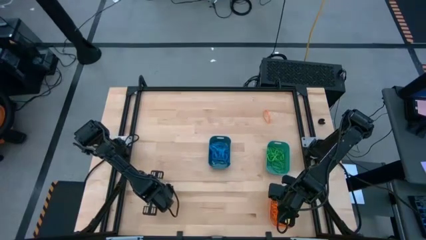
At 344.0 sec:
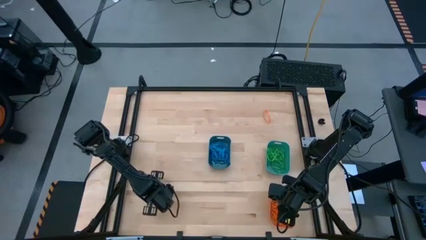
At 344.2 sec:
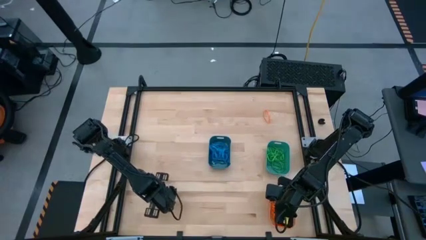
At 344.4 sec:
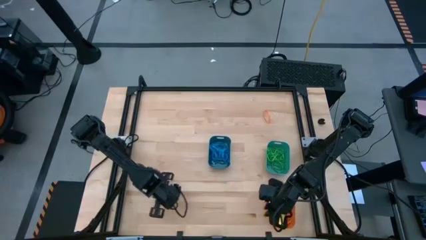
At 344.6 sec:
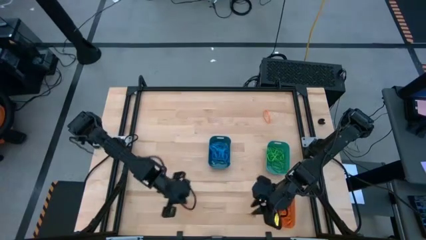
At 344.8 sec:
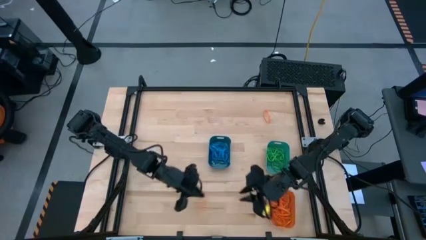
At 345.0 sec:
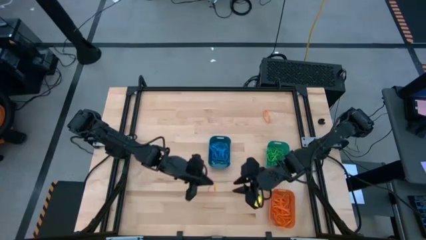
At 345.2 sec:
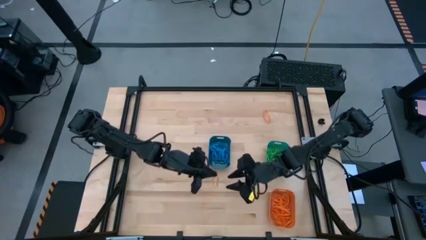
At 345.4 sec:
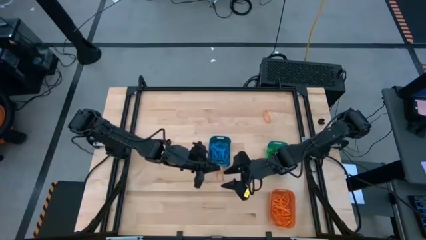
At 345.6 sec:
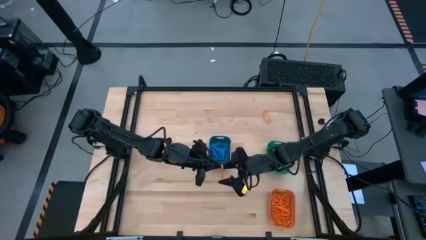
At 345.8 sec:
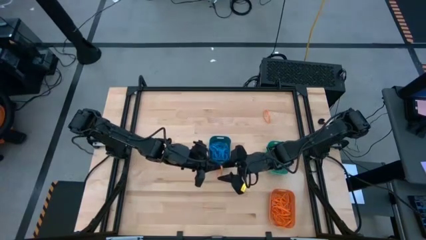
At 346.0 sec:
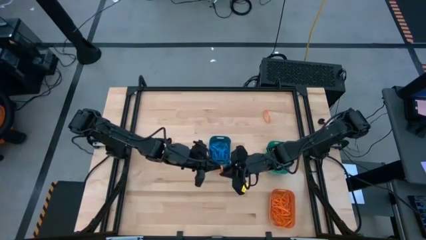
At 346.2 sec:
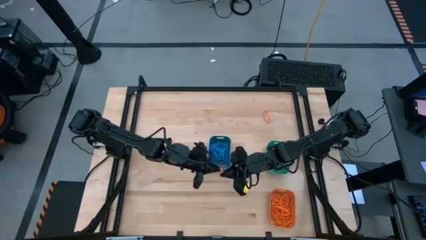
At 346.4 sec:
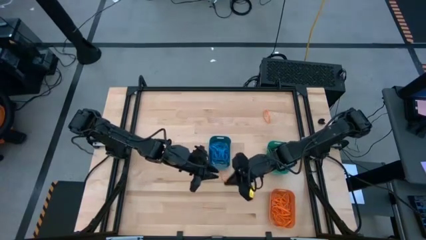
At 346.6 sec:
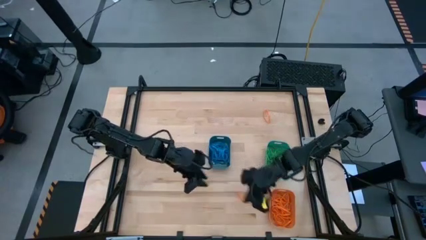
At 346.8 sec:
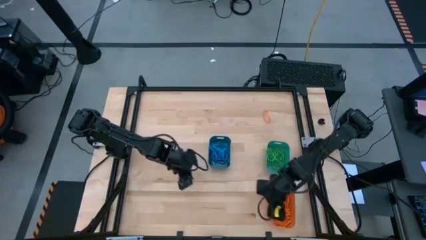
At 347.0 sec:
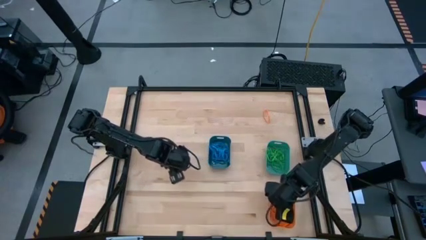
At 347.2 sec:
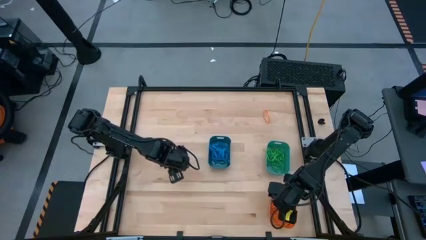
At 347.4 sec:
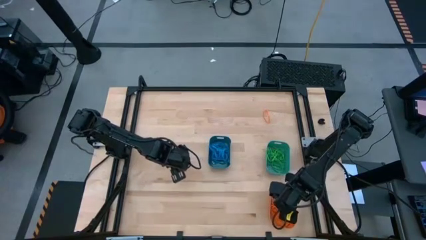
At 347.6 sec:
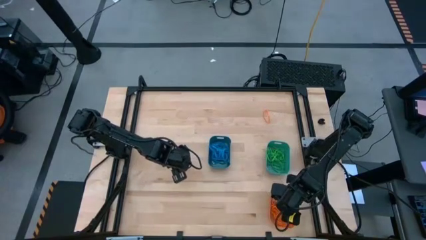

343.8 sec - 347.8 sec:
Task: Sort rubber bands into baskets
Put the orange rubberband into the orange bin

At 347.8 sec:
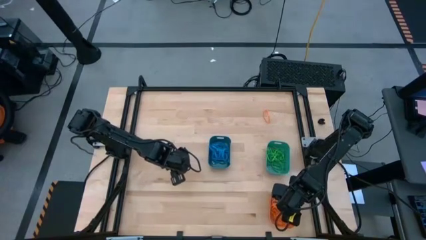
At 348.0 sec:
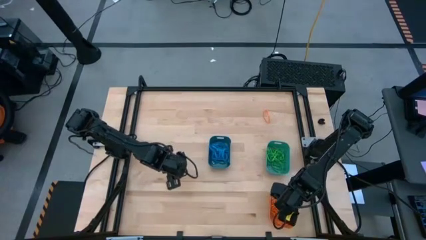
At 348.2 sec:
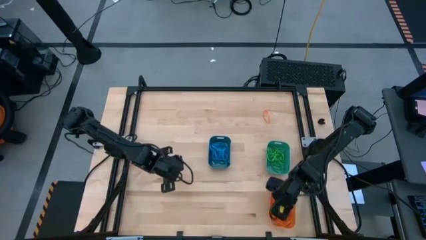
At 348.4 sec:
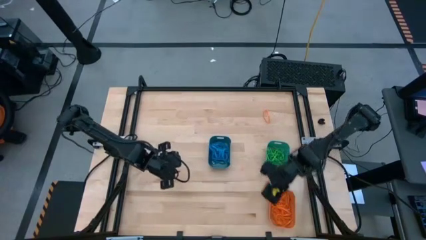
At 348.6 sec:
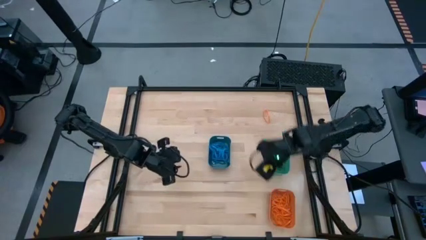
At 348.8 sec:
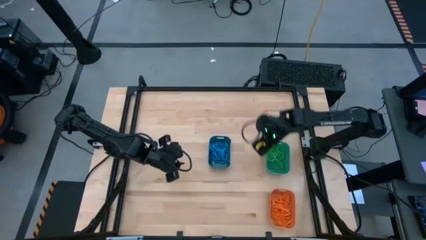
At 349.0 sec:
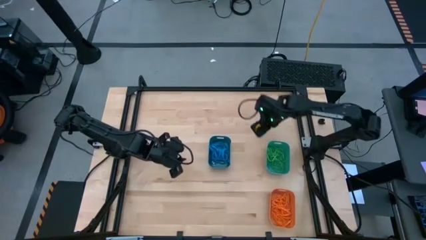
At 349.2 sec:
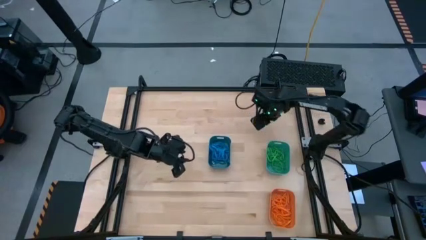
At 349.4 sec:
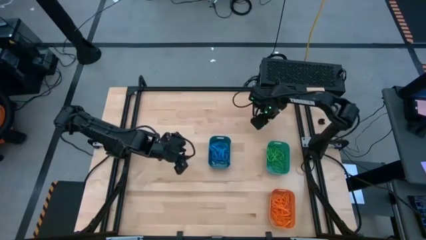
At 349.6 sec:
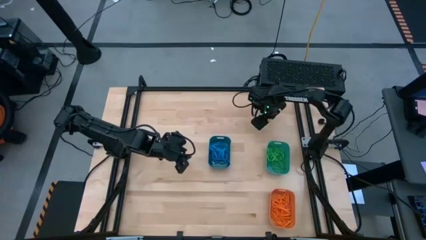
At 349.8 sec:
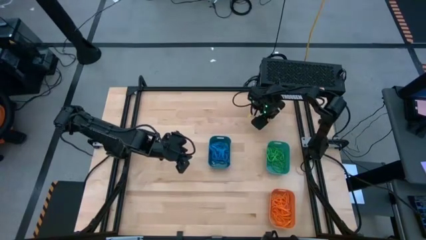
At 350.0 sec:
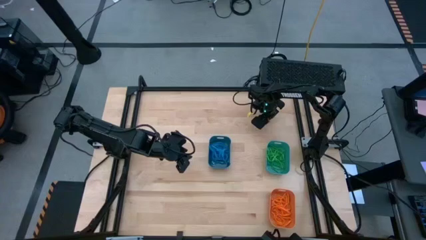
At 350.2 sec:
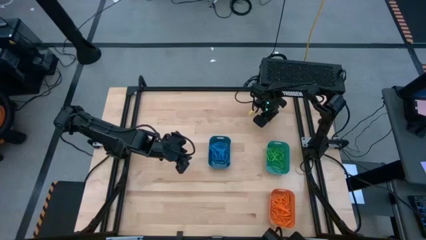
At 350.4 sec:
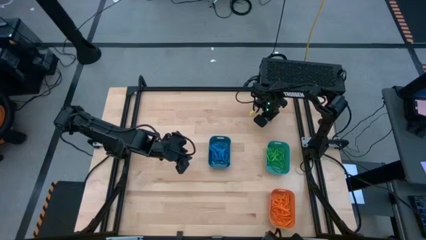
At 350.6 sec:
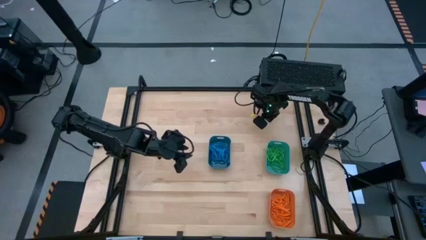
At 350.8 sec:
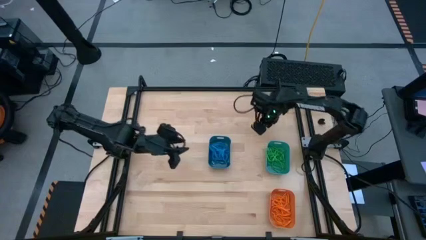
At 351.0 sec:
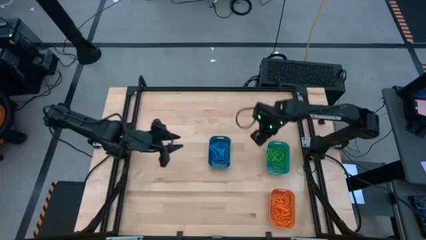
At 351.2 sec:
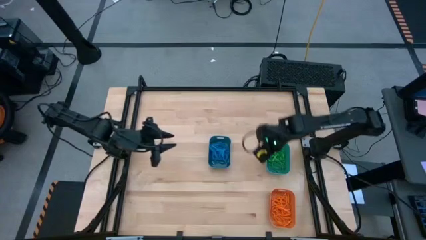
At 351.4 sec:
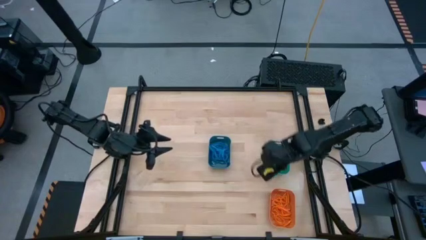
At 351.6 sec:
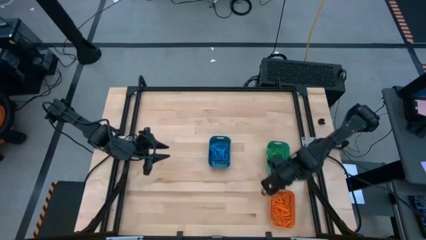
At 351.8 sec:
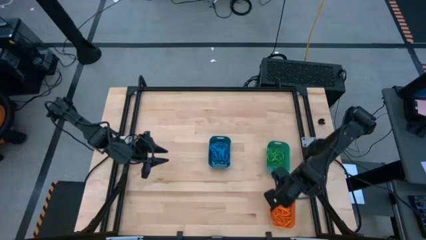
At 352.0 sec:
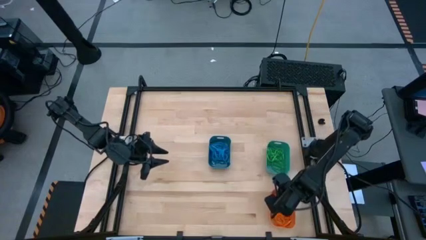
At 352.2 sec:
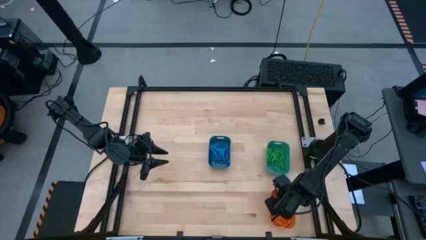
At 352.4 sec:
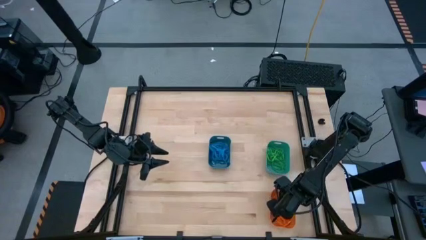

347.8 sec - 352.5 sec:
Put the orange rubberband into the orange bin

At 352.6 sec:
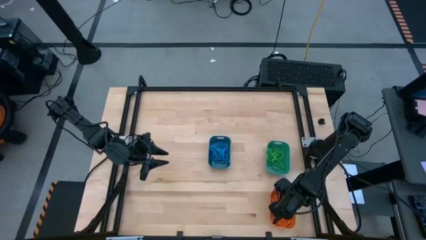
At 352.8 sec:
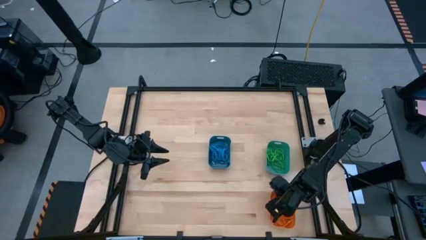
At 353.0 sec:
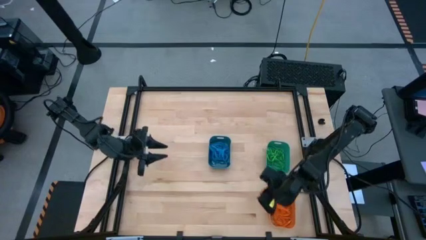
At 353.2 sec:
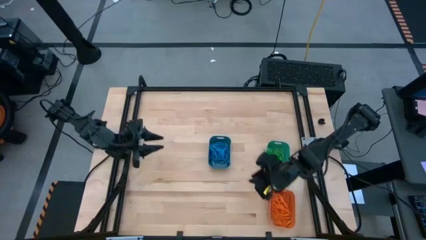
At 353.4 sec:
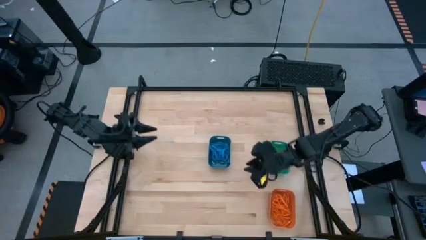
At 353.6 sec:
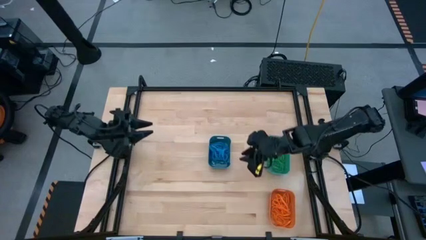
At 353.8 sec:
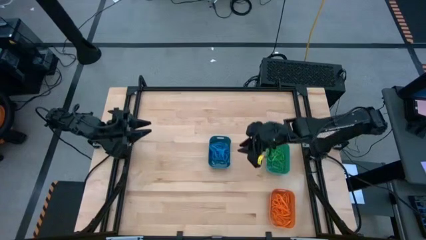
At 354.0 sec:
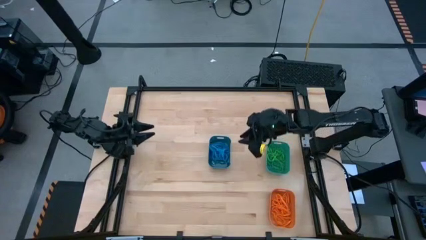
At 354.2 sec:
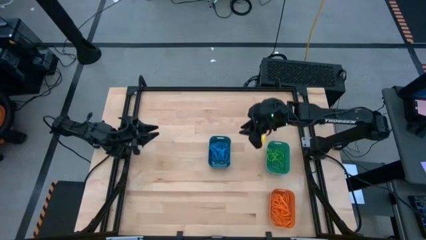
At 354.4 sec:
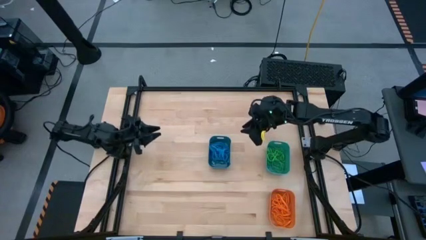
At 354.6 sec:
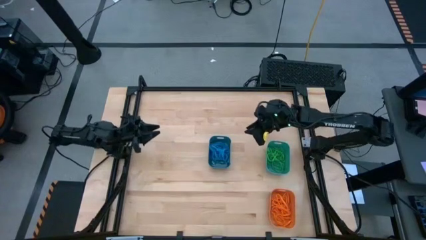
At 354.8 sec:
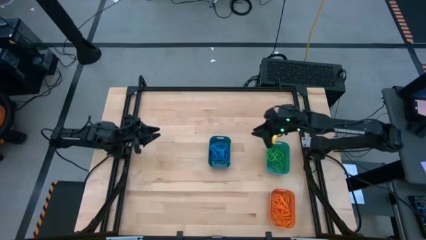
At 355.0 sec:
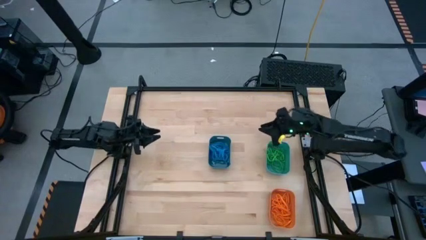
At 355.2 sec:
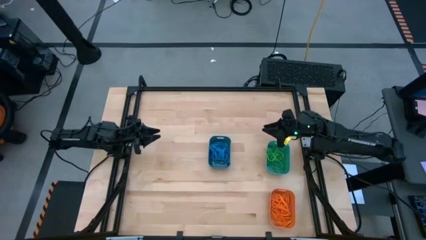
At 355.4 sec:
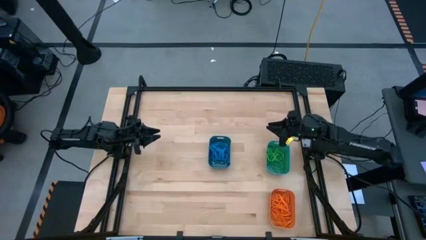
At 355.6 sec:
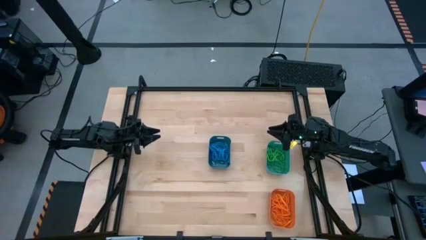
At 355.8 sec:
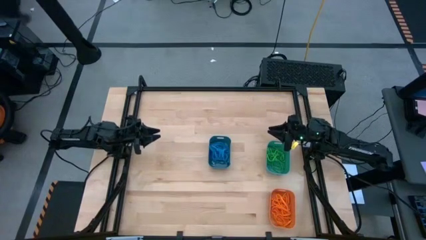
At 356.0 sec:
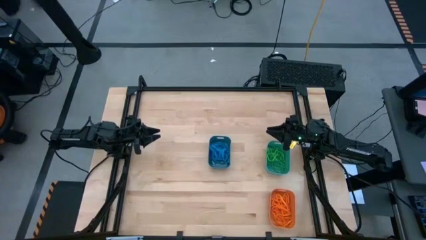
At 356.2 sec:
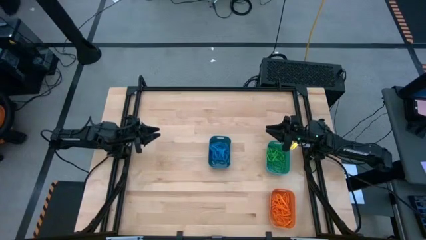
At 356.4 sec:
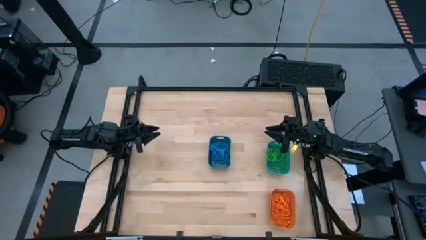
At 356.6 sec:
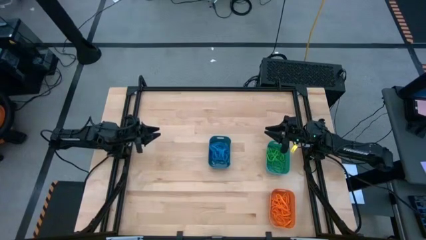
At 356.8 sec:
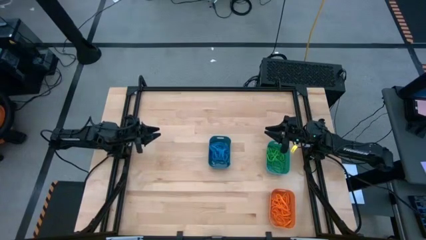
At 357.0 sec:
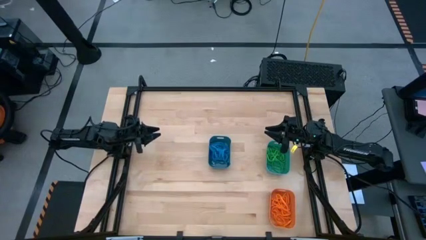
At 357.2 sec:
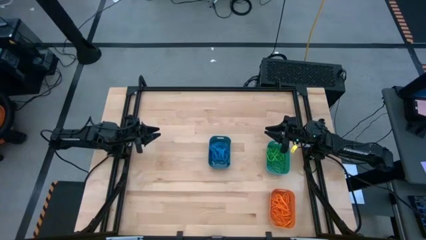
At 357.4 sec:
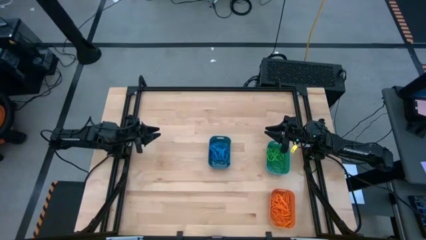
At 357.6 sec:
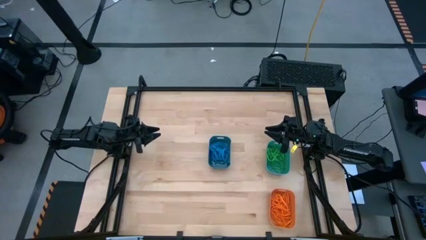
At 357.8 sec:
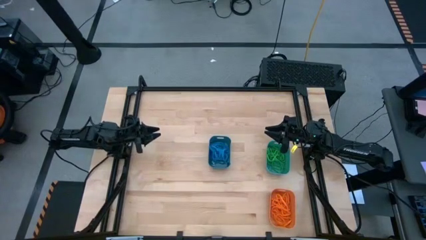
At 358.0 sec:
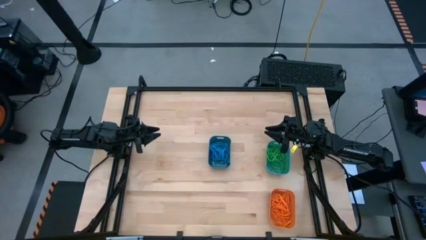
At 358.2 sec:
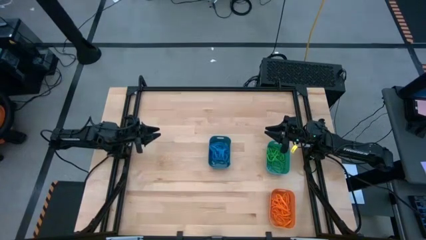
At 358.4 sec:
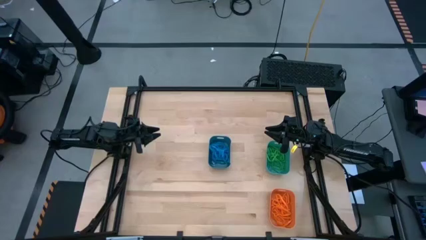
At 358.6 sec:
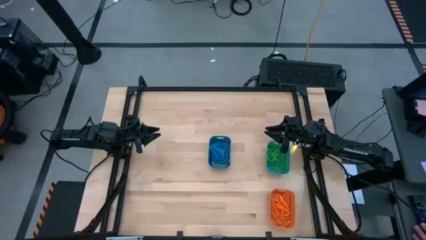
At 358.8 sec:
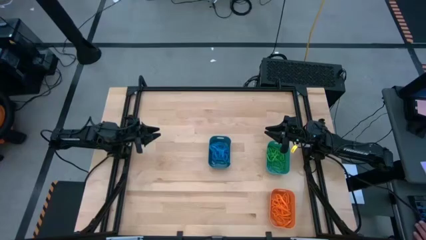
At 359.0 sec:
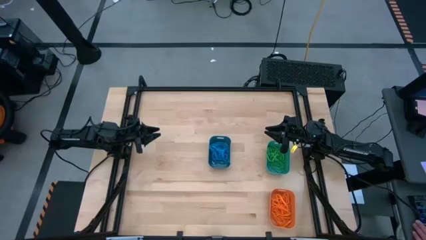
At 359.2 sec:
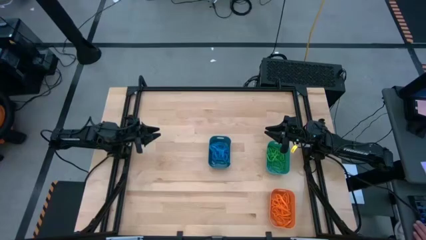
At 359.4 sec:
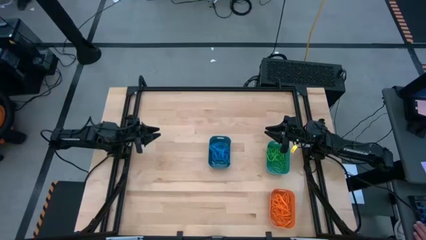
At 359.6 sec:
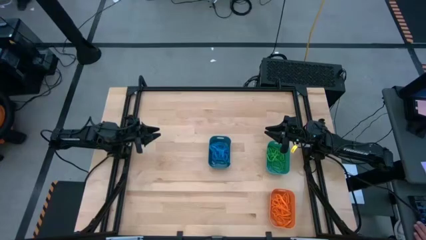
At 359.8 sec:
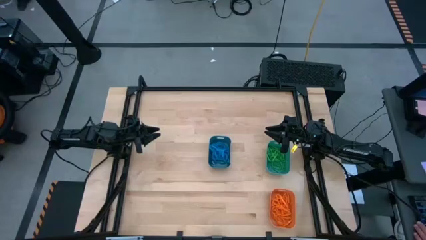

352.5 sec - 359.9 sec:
Return to Home Position
